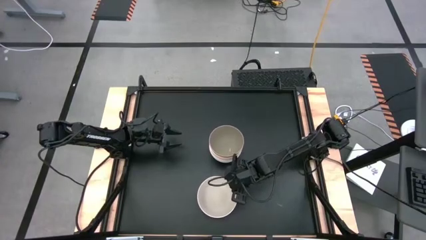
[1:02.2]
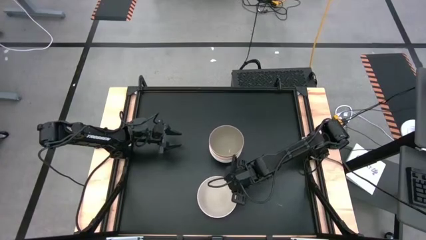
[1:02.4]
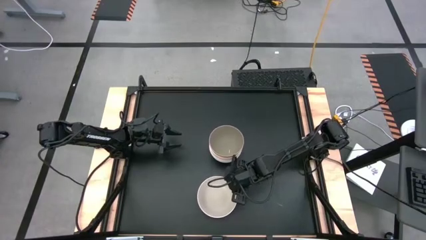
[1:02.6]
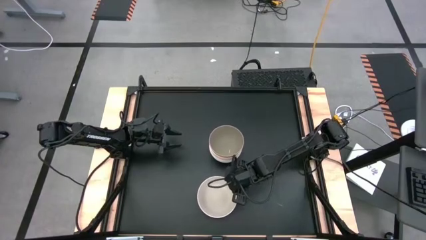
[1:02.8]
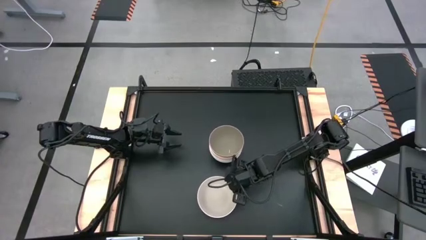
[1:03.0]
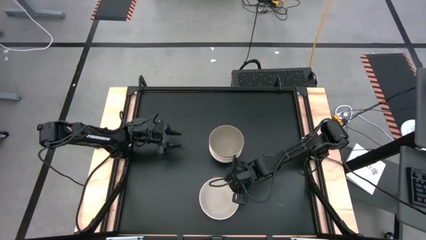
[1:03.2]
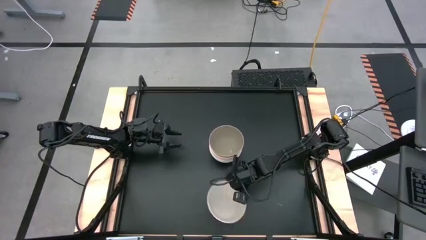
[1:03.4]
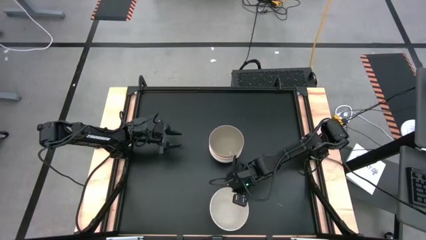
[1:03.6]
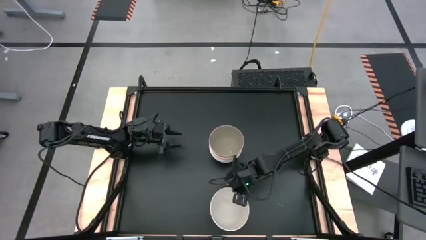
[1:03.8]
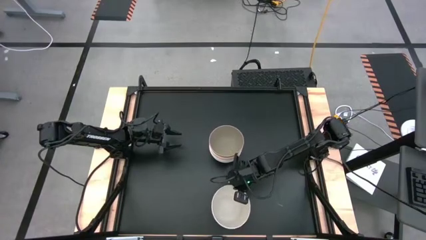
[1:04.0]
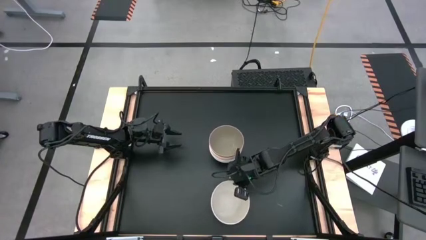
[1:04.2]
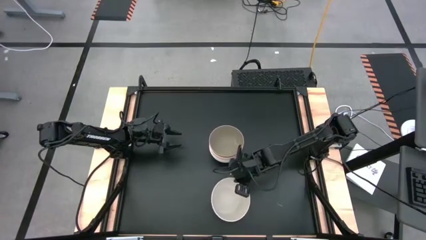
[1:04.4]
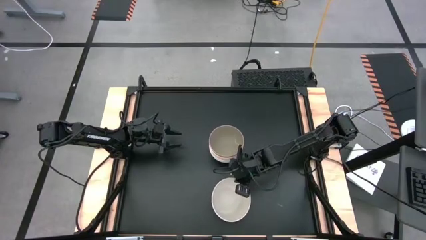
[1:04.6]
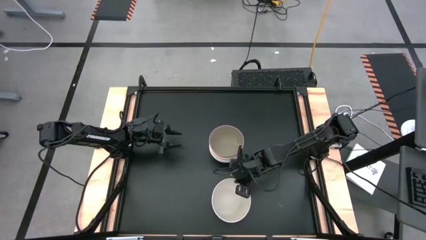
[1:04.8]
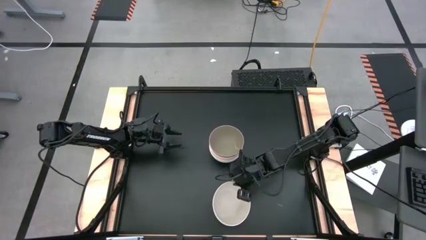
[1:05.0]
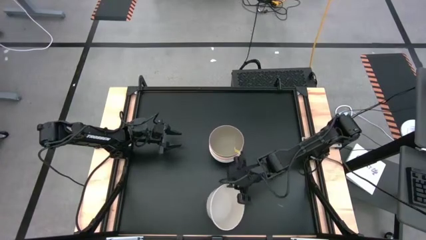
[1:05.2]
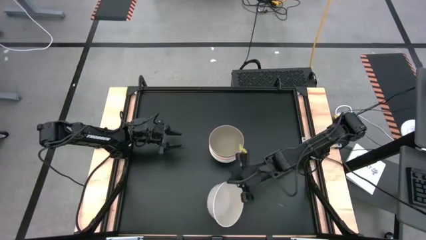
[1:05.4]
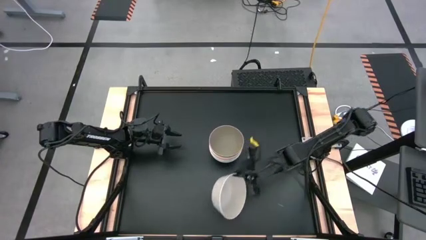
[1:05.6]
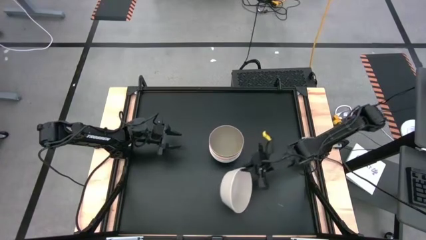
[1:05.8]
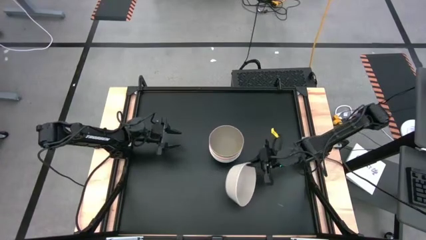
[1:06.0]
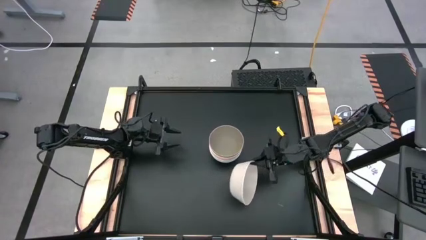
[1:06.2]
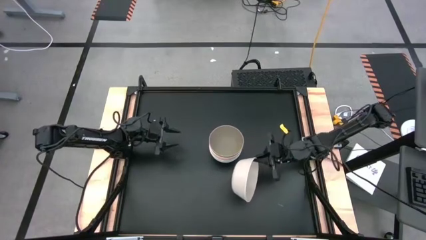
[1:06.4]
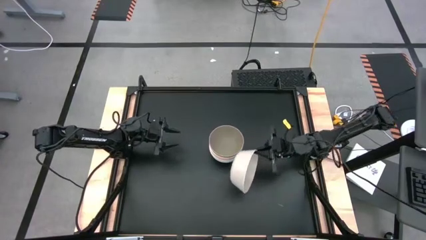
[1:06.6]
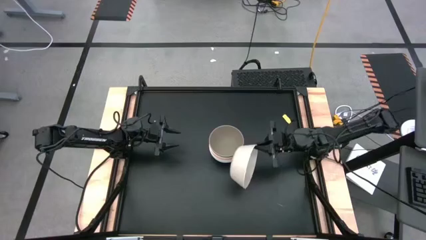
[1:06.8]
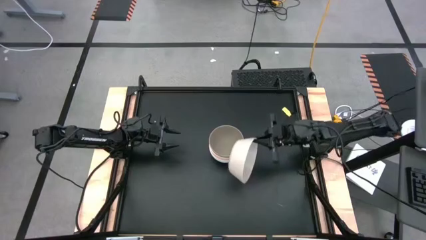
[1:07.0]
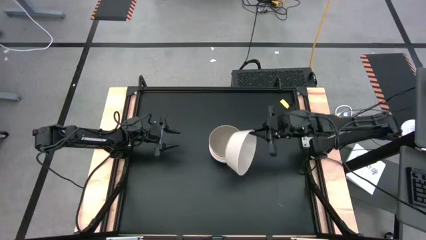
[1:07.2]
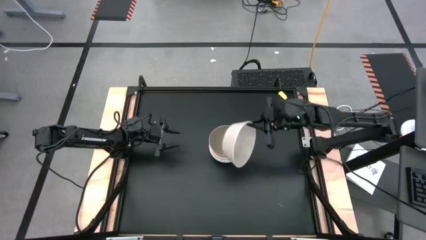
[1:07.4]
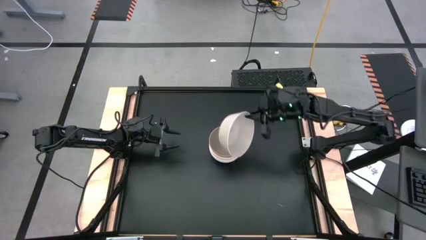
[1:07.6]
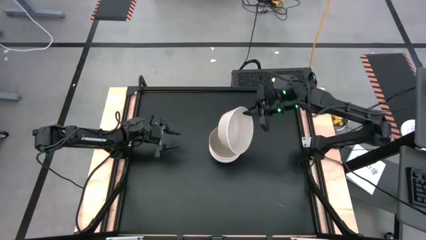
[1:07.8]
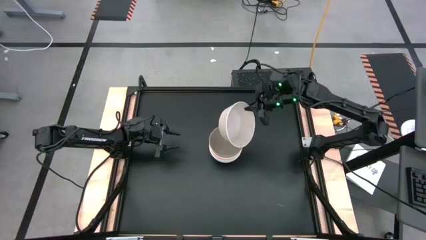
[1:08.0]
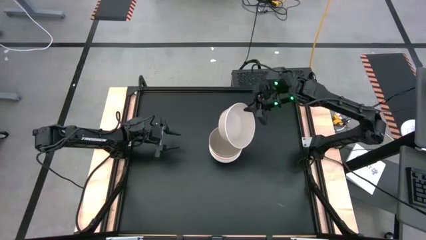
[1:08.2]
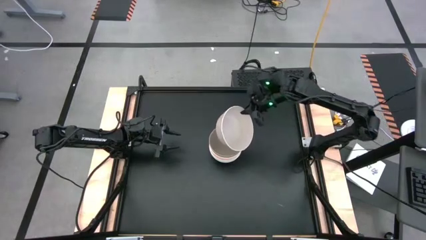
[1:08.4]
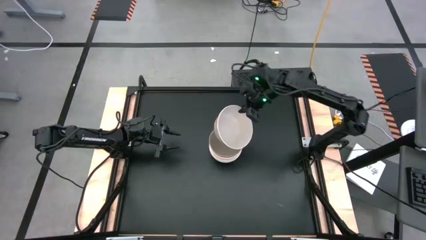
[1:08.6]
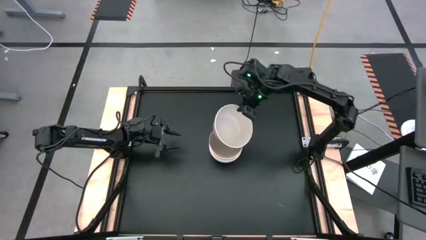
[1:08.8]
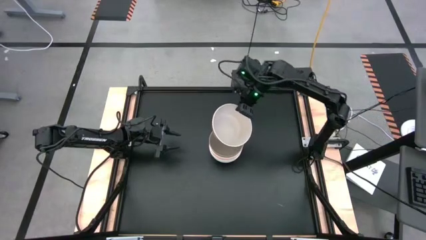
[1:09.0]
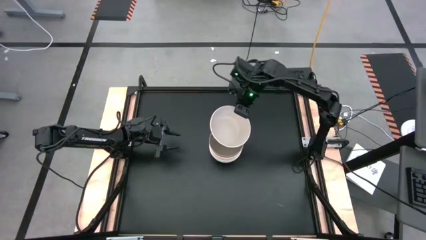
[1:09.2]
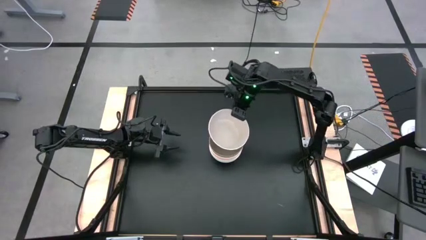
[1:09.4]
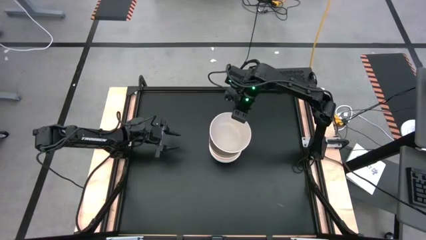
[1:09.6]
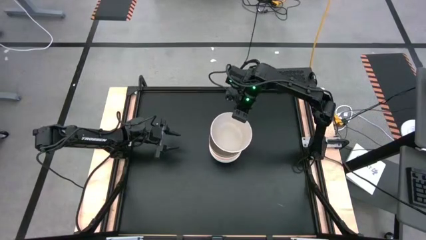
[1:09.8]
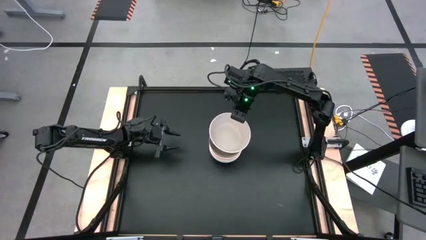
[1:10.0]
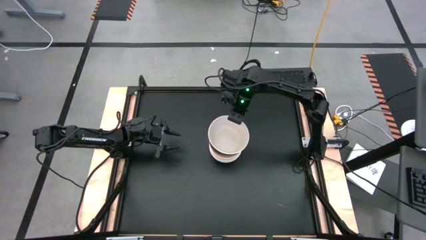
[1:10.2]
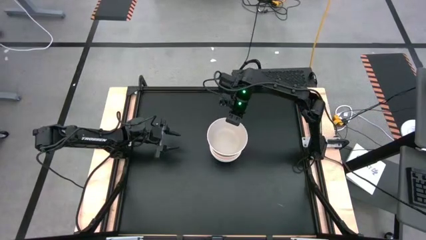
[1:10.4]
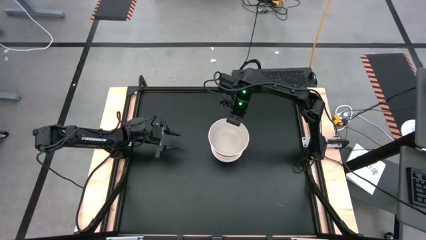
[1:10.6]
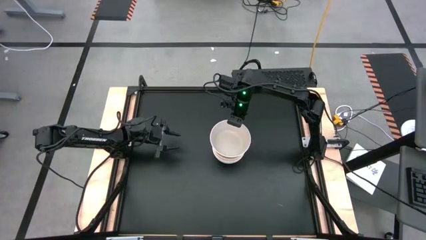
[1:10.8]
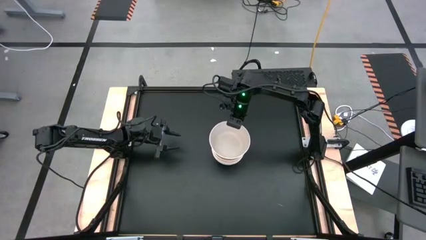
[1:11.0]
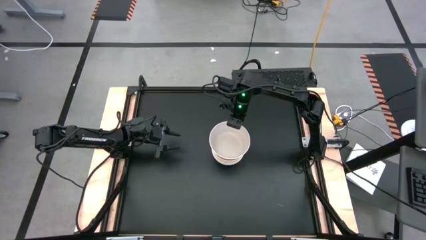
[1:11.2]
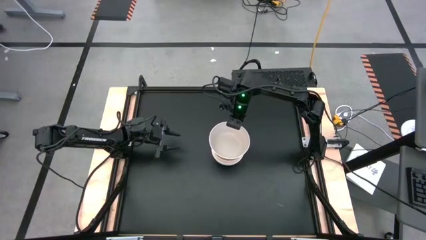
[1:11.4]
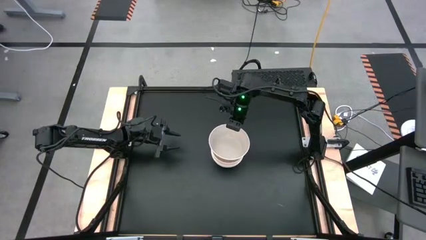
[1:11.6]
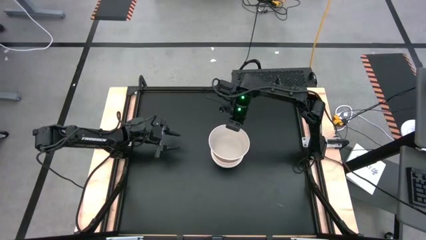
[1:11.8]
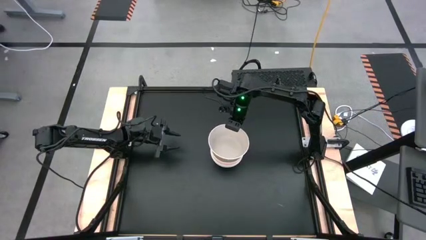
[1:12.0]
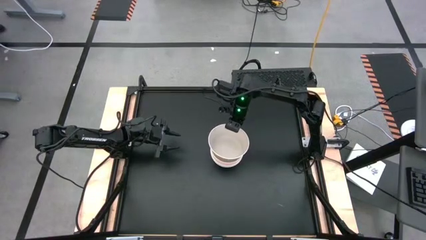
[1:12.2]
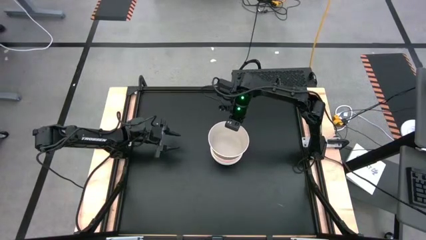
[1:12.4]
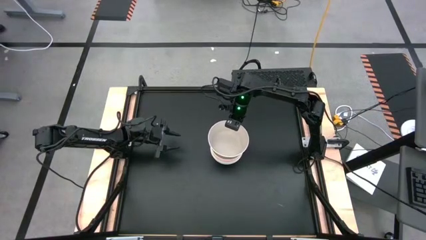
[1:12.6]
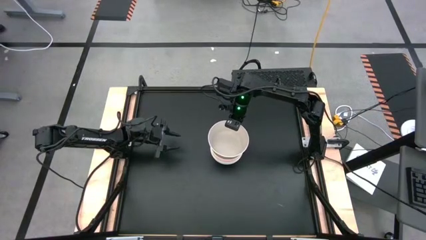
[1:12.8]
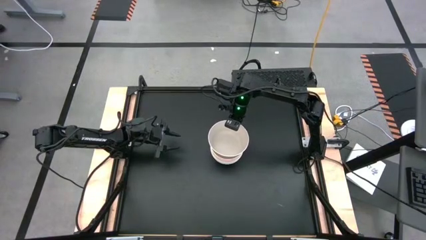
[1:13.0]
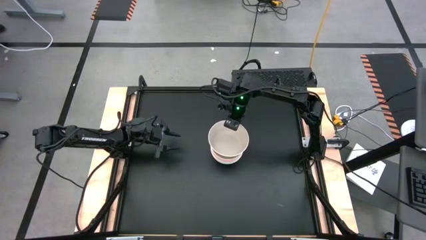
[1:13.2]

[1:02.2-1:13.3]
Task: Nest bowls inside each other
Stack the light brown bowl on the gray bowl

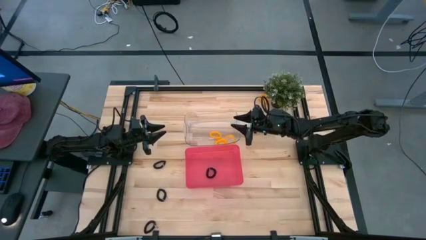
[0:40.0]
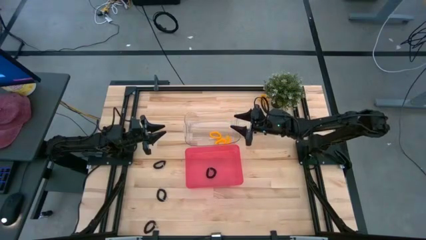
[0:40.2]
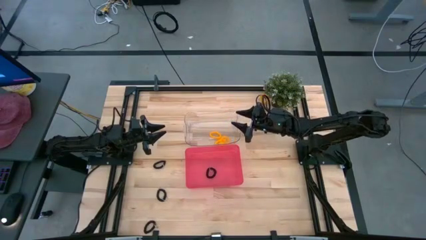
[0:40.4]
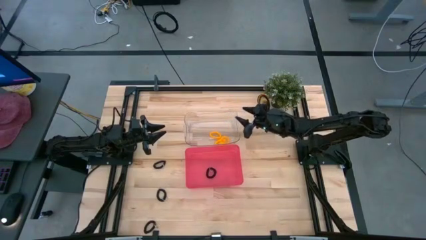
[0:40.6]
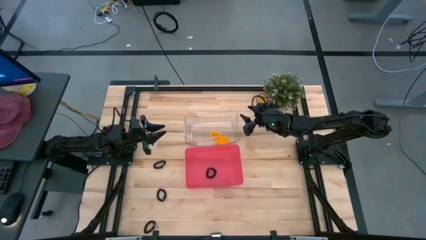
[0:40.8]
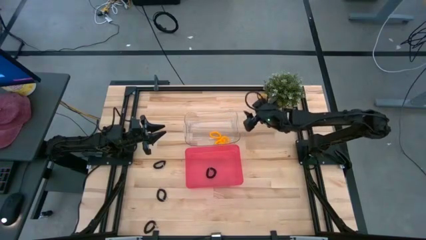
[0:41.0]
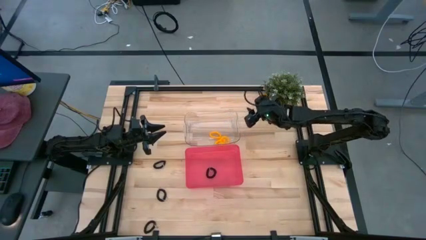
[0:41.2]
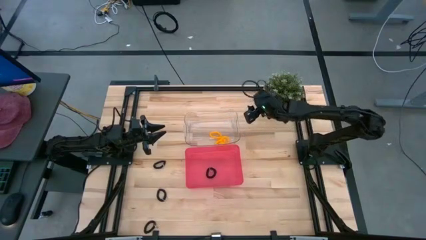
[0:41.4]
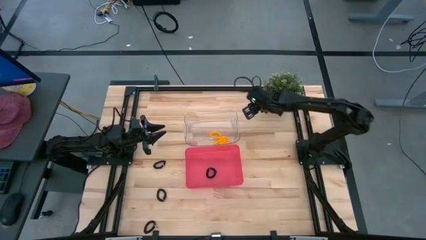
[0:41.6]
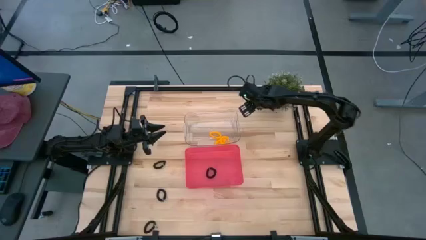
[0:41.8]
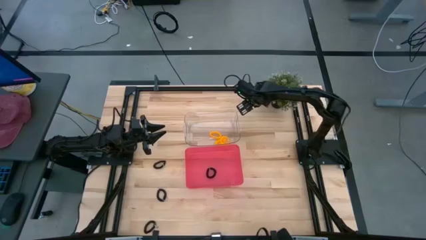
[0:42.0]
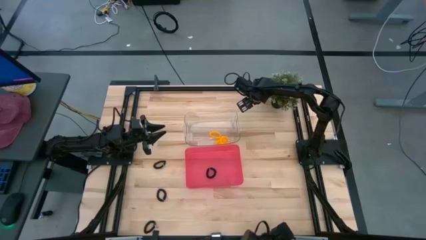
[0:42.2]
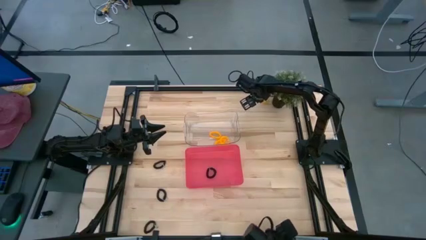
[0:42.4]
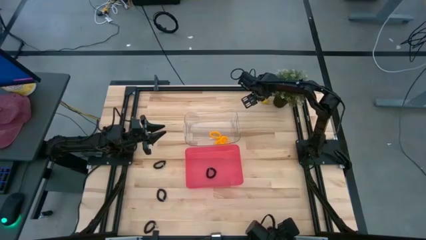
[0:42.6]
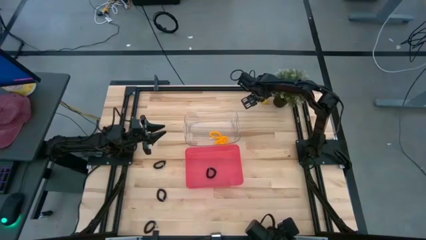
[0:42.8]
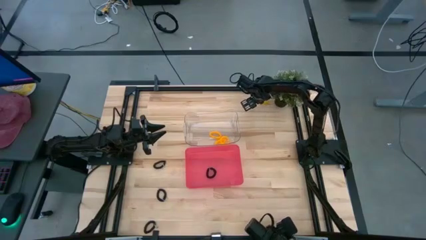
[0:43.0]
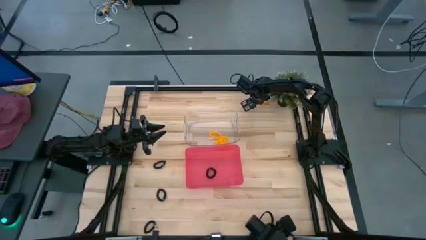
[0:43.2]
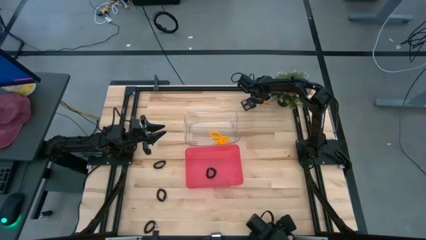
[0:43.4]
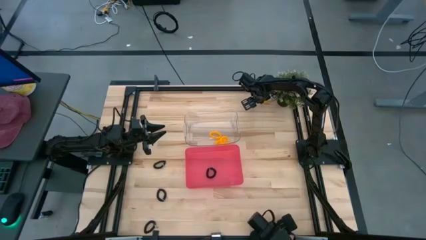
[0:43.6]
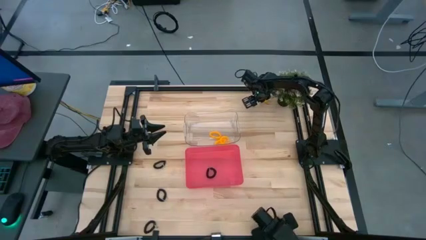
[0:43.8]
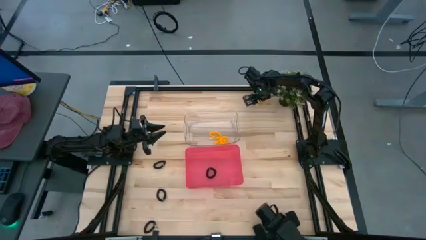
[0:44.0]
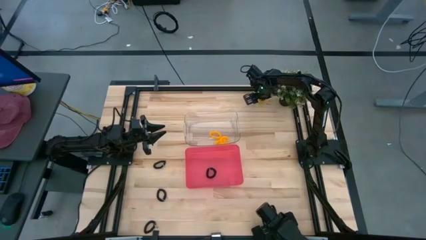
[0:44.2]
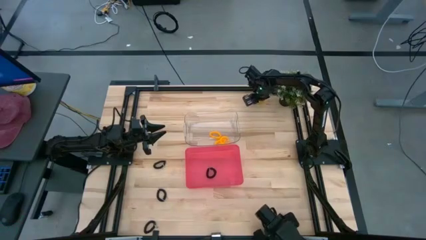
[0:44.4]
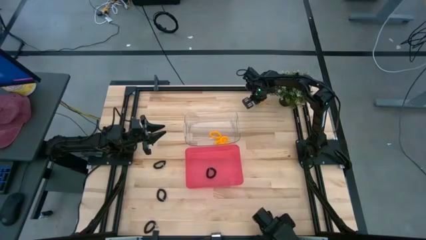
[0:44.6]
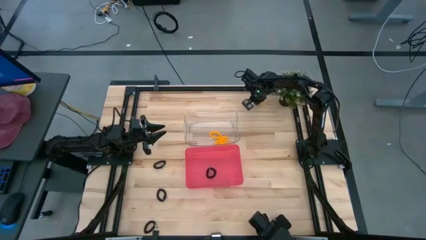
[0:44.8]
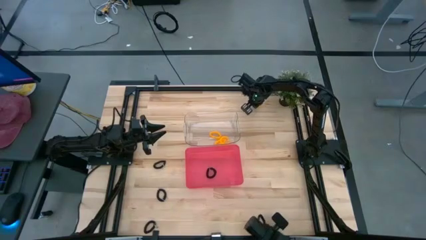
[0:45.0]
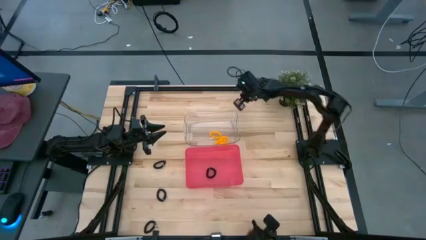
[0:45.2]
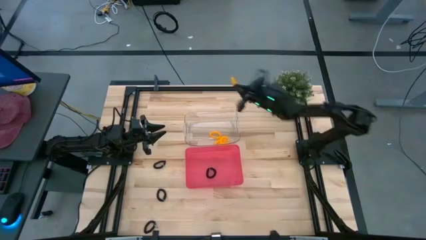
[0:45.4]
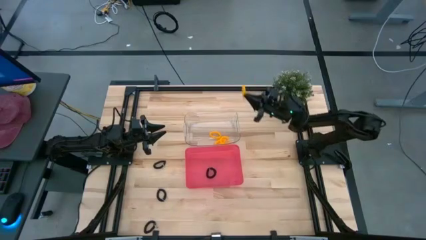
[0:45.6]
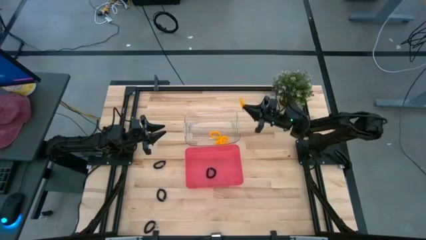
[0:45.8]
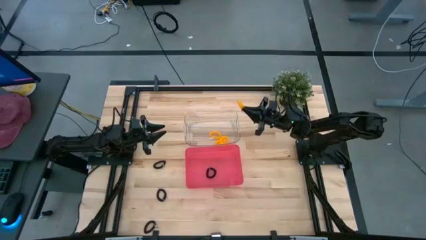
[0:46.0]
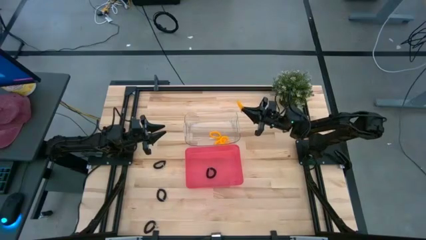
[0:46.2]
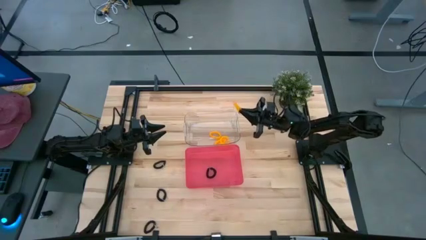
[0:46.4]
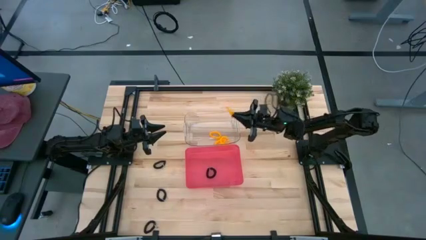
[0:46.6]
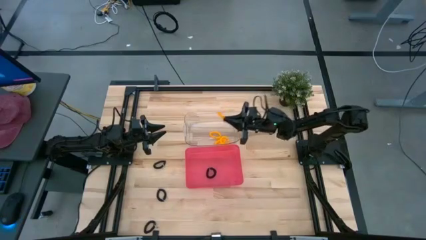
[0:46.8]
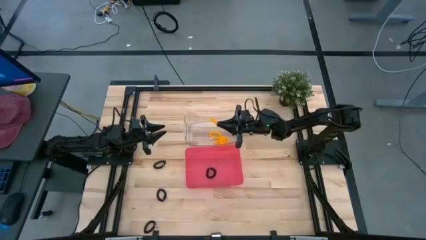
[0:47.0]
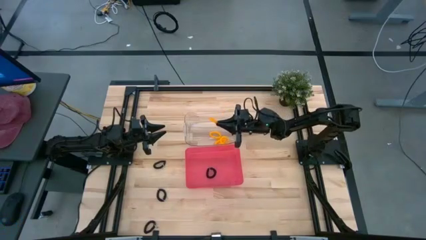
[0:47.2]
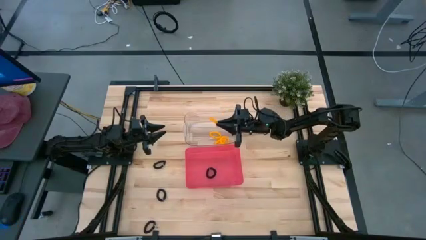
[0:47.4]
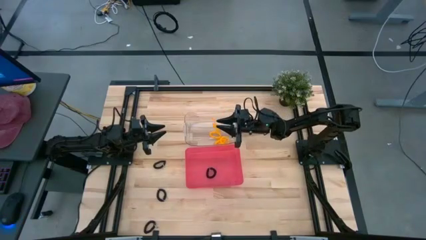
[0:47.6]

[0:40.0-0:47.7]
Task: Sort spring keychains
Put the yellow spring keychain into the transparent bin
